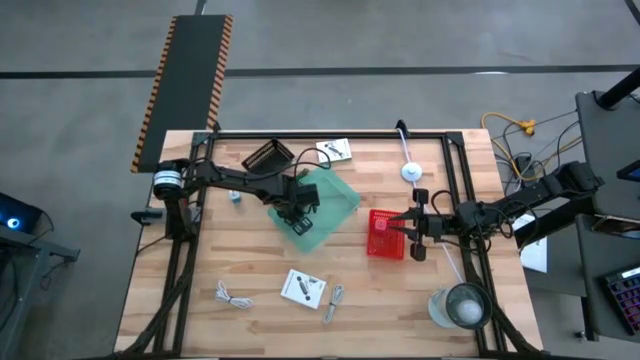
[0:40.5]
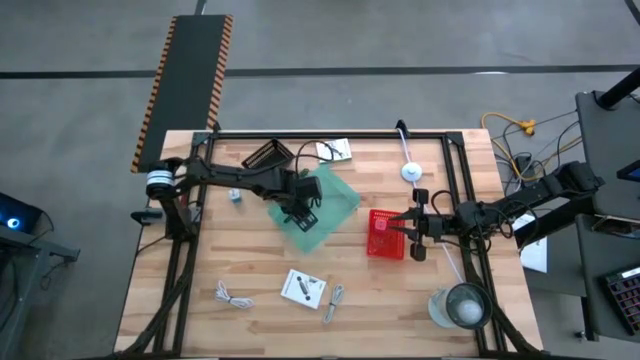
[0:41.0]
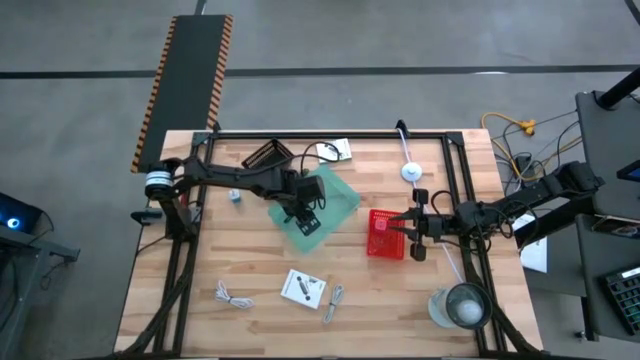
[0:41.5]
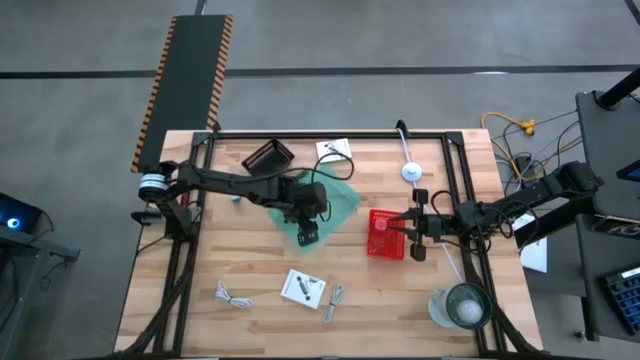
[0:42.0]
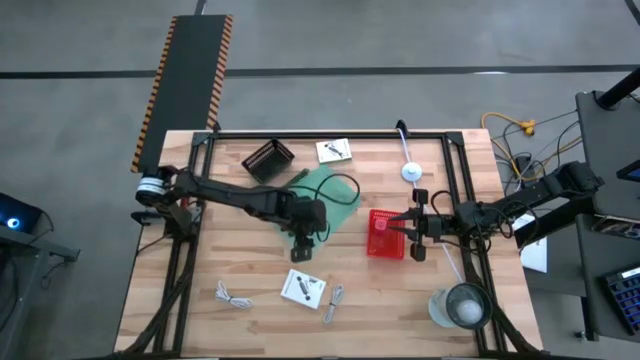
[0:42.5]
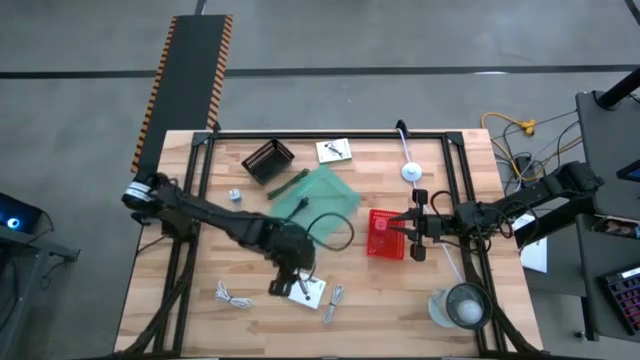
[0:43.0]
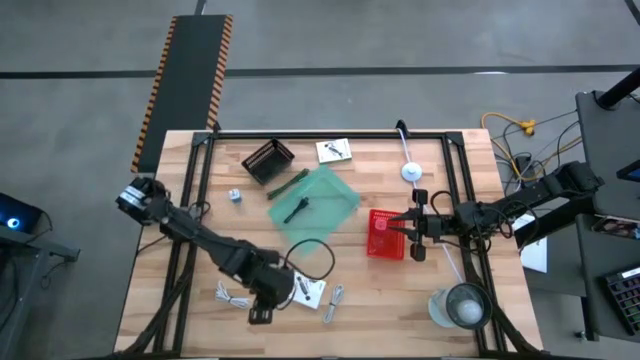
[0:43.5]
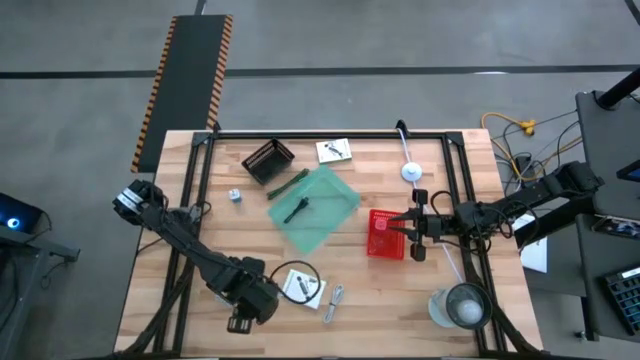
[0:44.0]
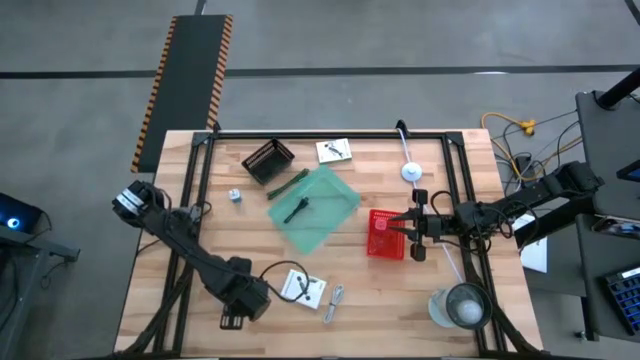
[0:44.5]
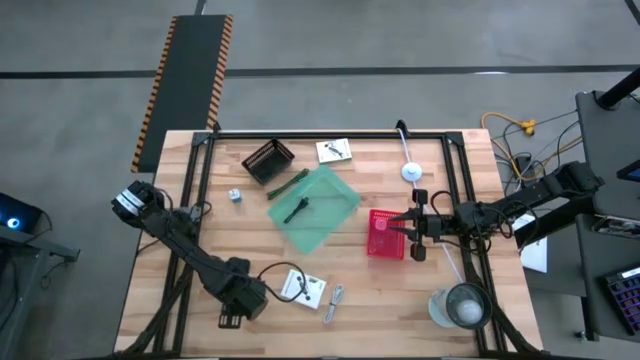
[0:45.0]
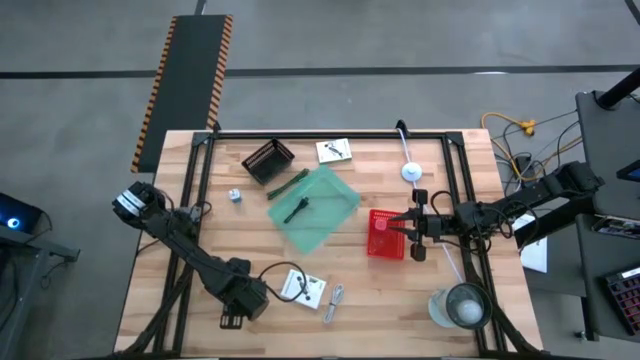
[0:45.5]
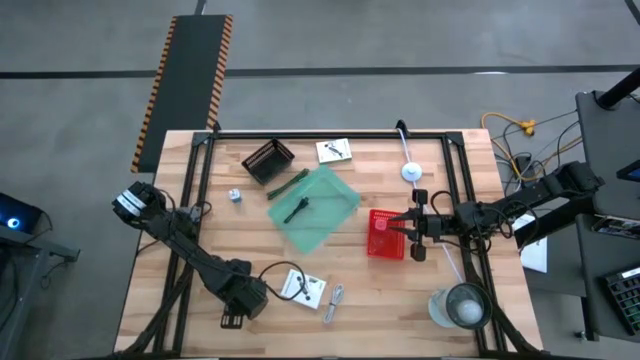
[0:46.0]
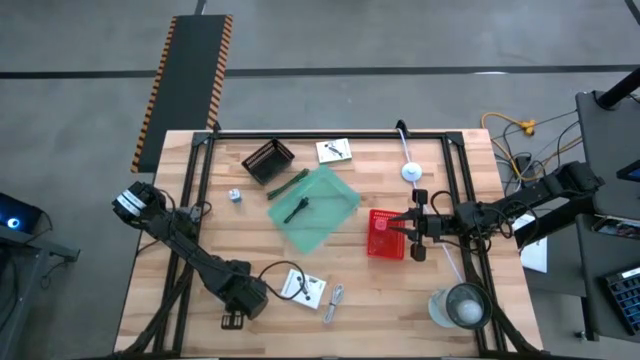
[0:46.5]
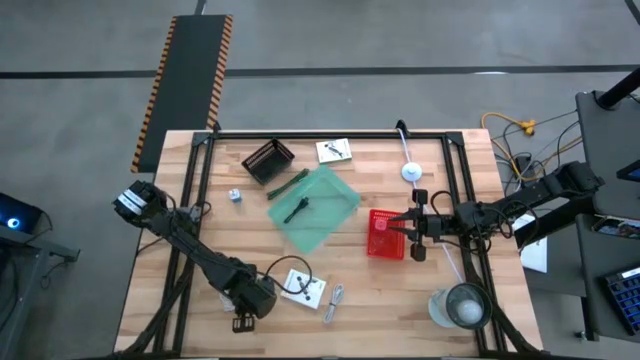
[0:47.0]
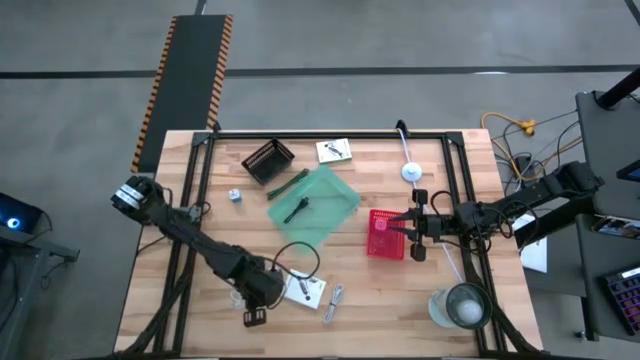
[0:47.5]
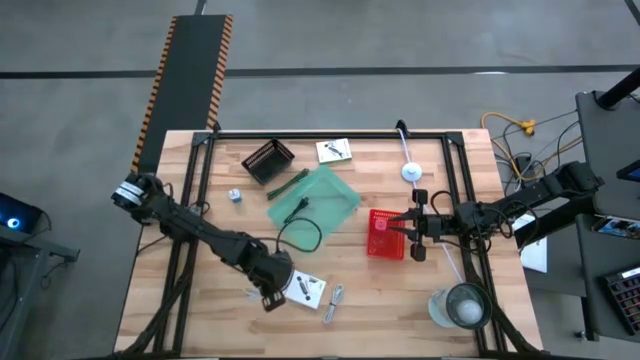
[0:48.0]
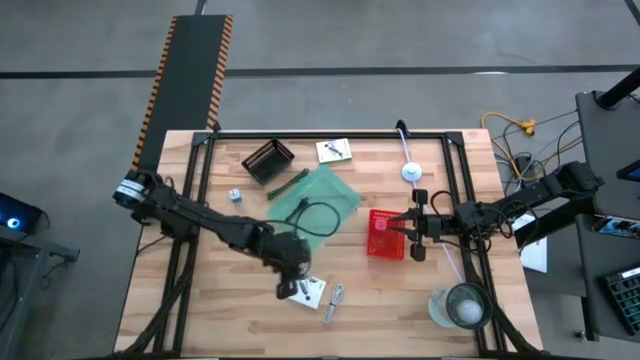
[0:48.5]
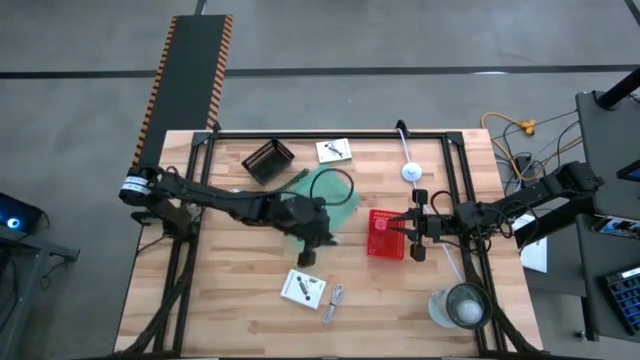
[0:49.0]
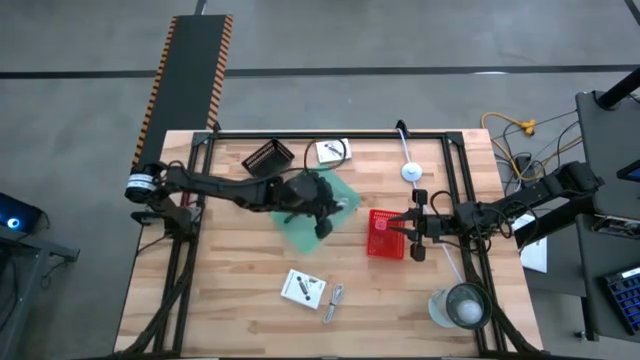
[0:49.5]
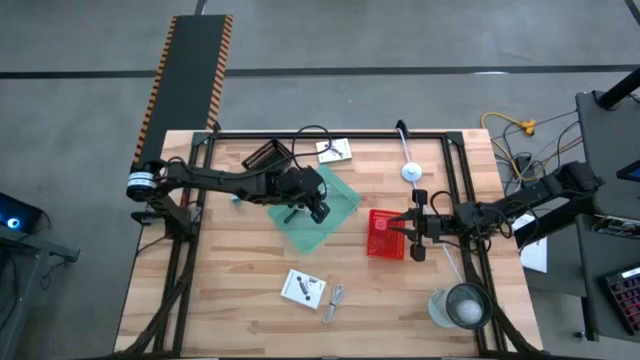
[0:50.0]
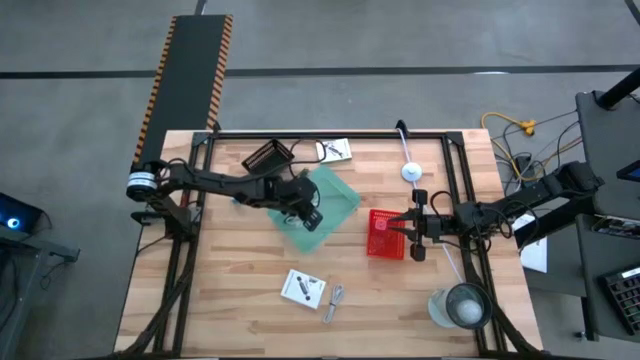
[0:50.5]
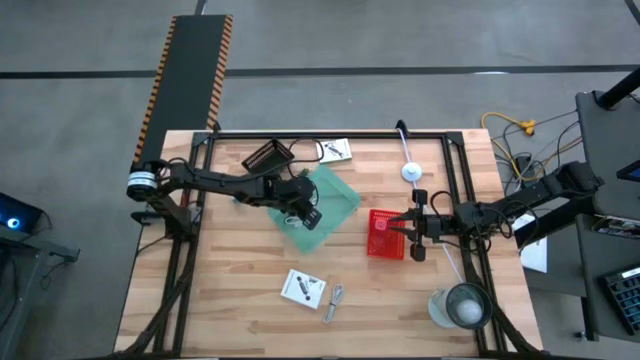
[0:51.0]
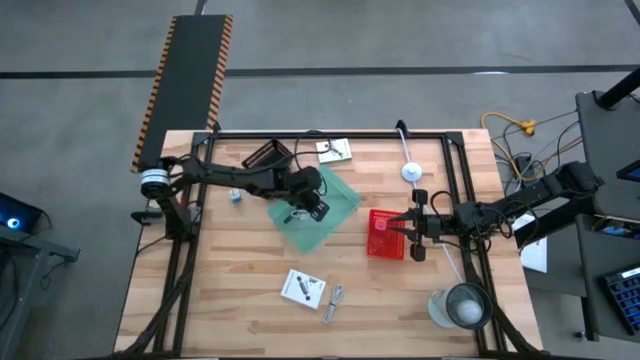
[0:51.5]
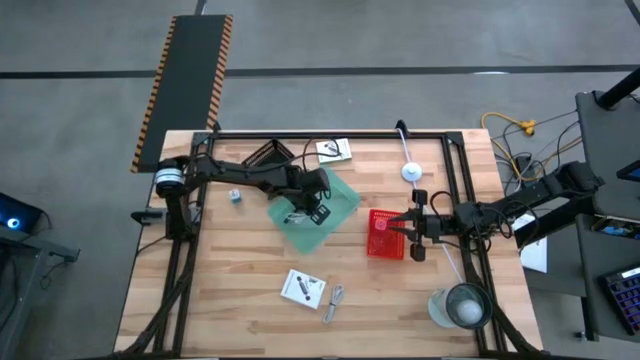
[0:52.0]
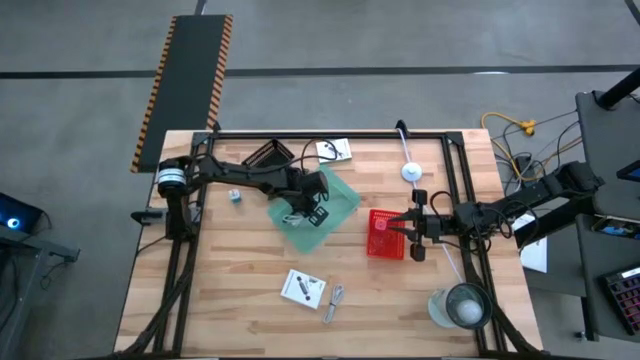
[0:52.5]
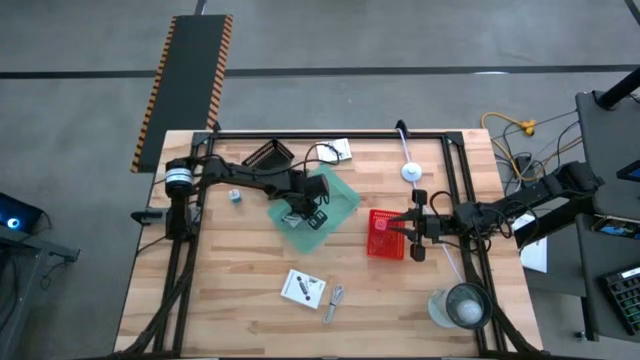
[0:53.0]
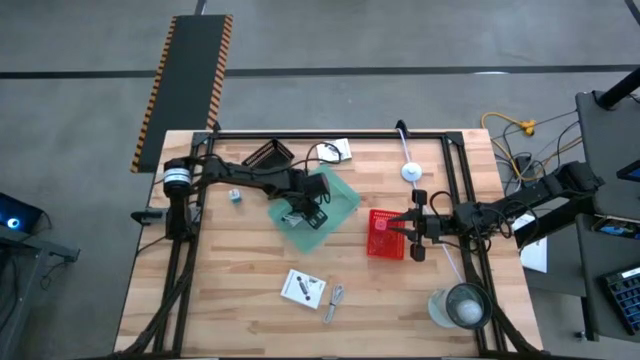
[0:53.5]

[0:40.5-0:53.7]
Task: Pick and place items into bin
Put the left white charger cable into the green bin

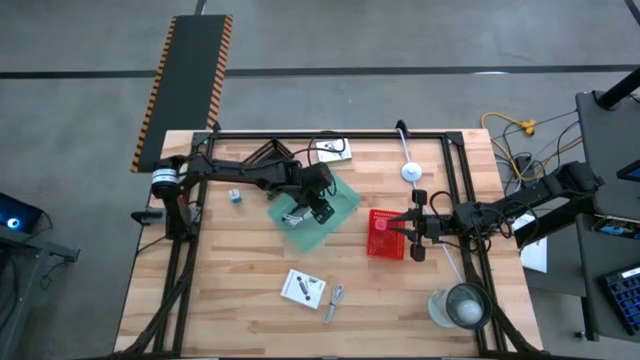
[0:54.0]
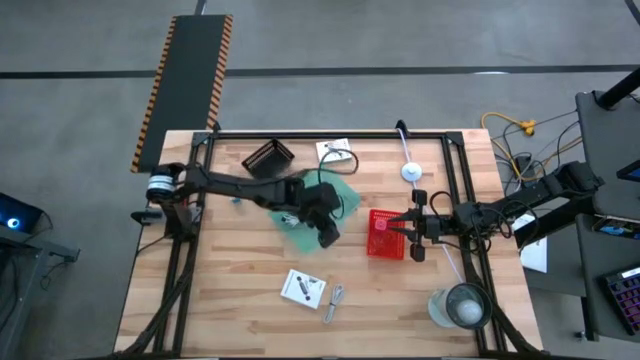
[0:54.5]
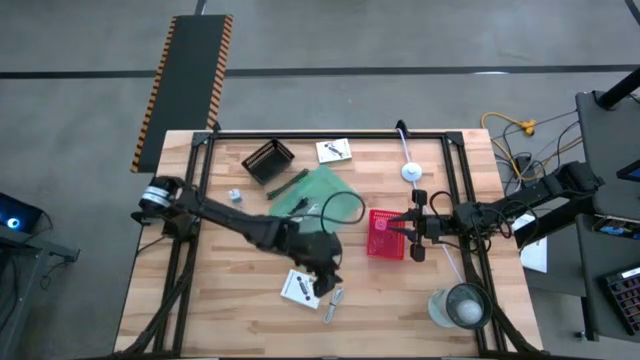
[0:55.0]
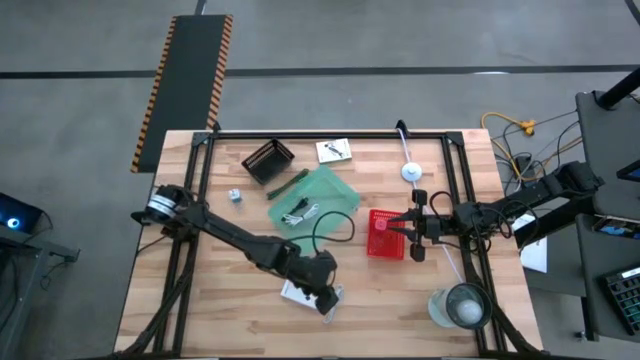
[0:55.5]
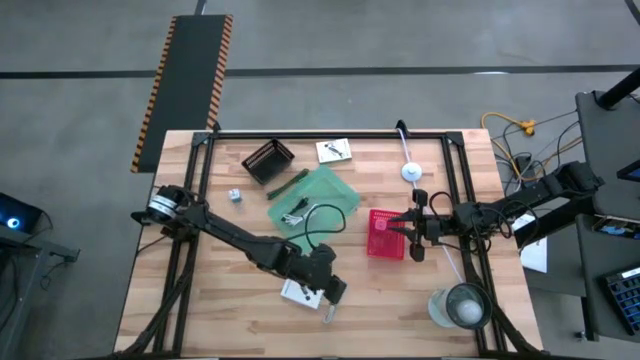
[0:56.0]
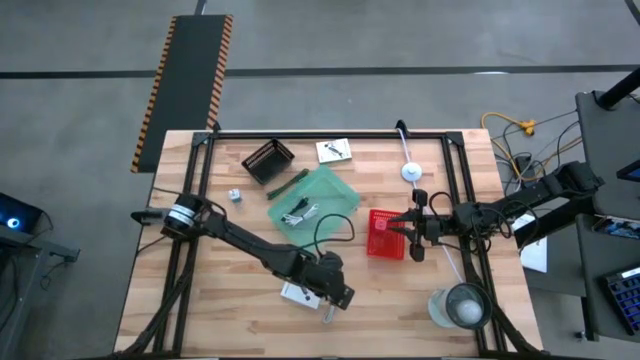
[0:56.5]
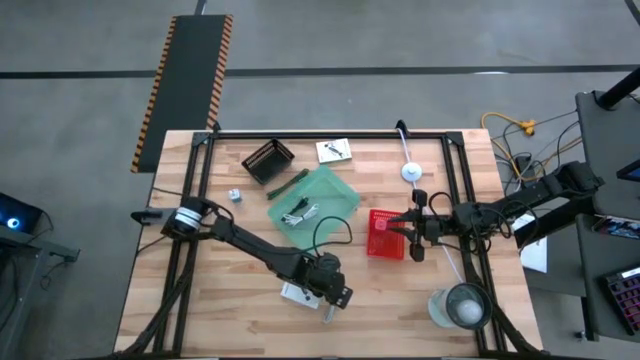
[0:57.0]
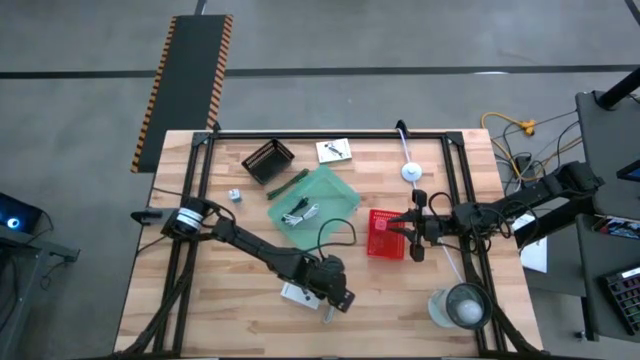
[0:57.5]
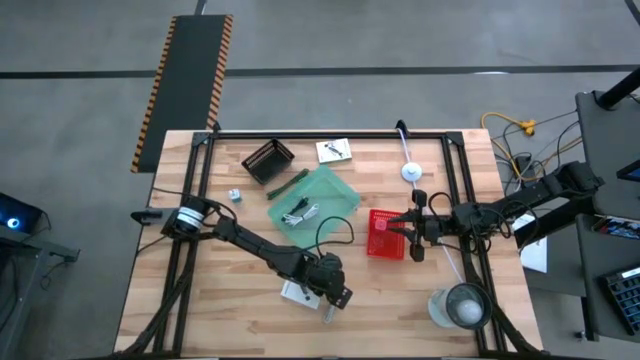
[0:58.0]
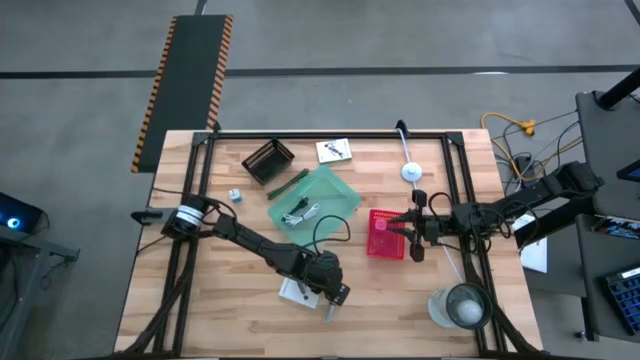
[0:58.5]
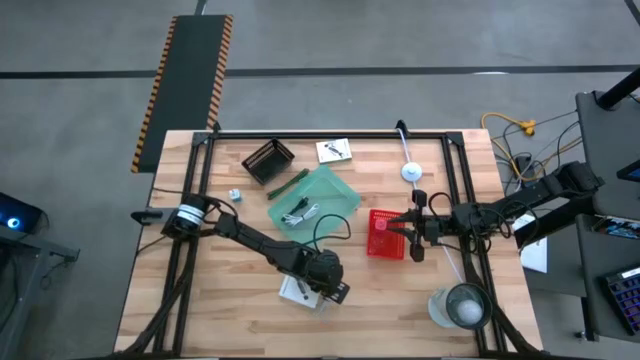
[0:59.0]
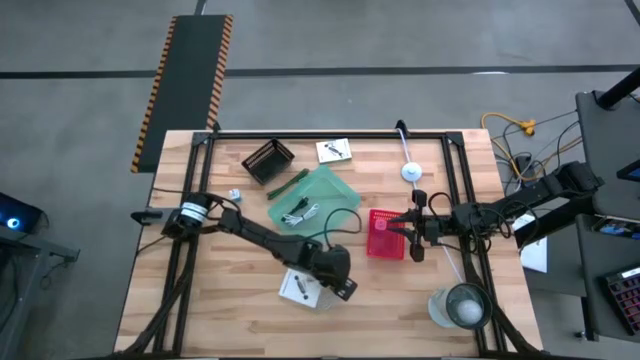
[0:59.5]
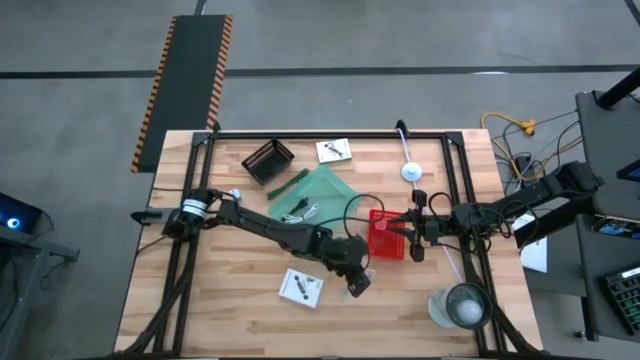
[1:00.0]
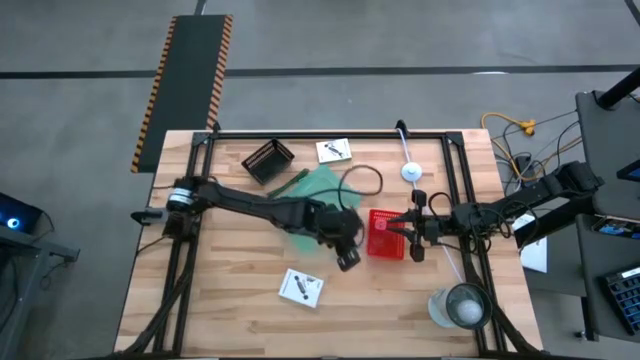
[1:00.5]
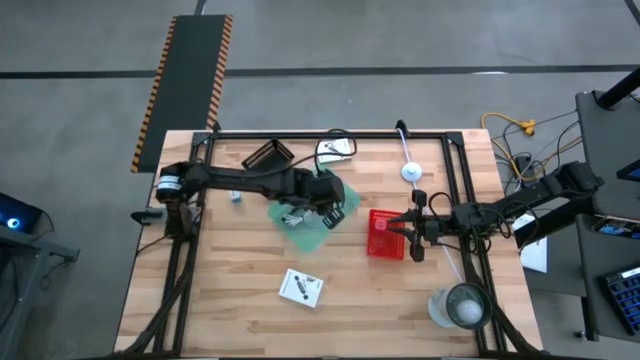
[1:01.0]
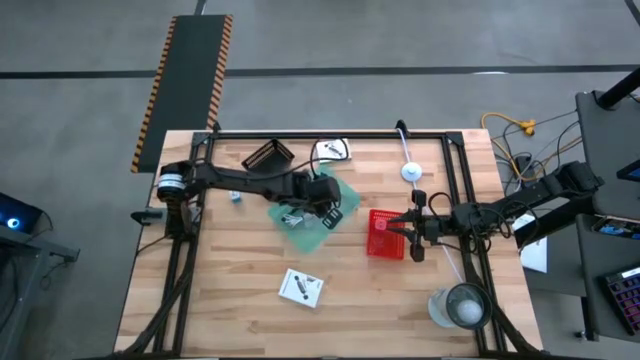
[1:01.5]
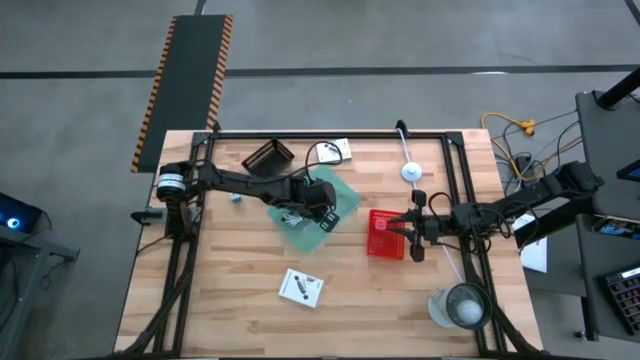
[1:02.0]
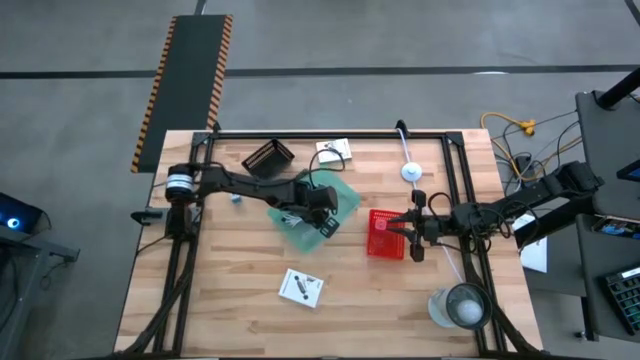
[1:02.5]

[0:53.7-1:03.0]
Put the white charger cable into the green bin
